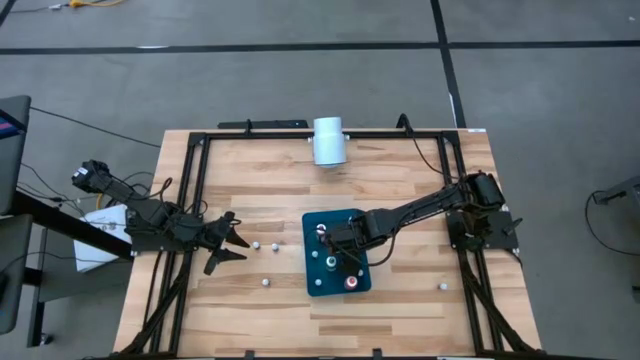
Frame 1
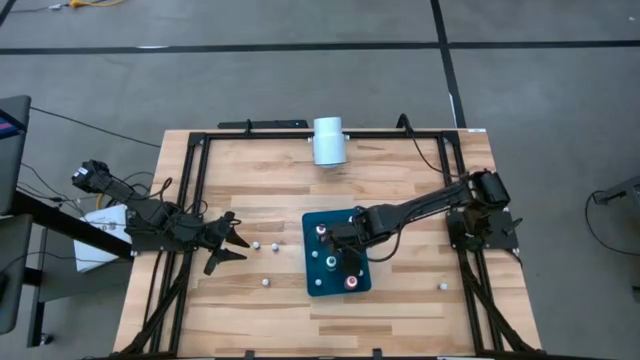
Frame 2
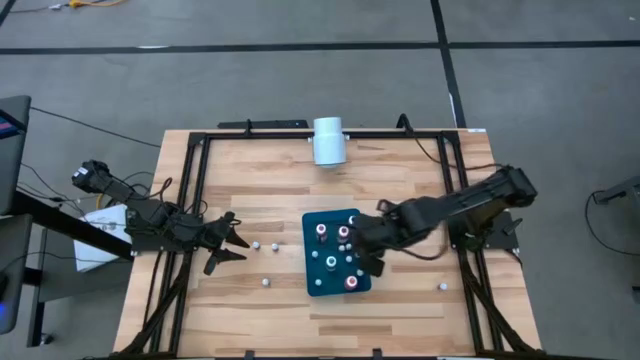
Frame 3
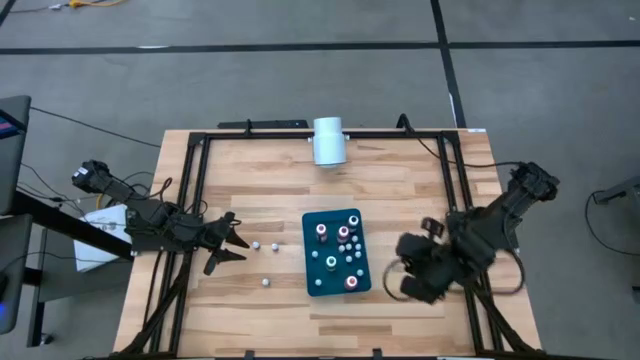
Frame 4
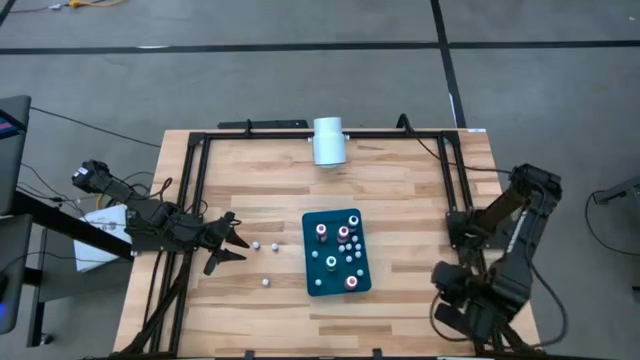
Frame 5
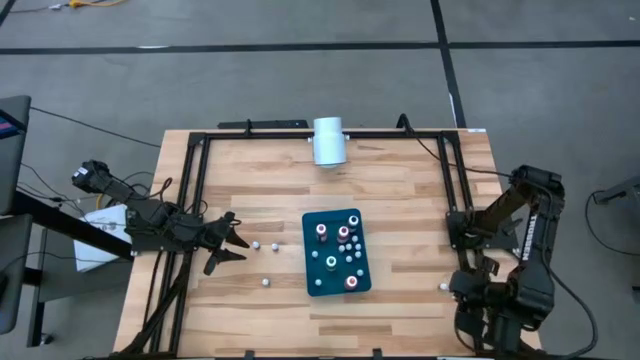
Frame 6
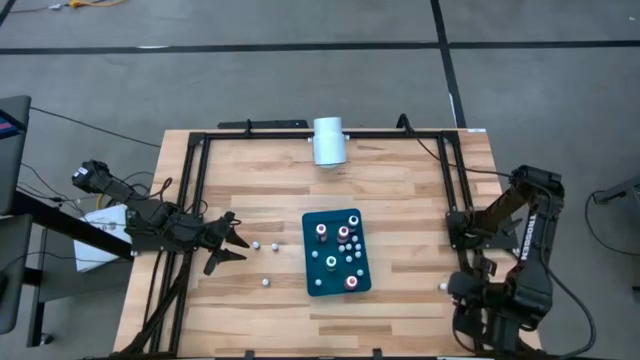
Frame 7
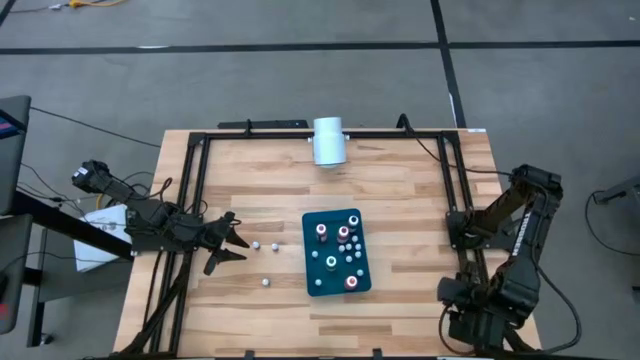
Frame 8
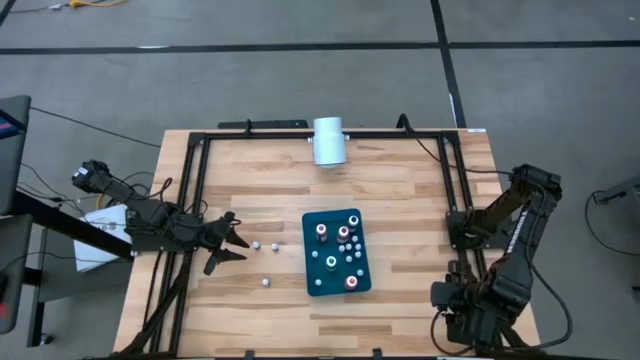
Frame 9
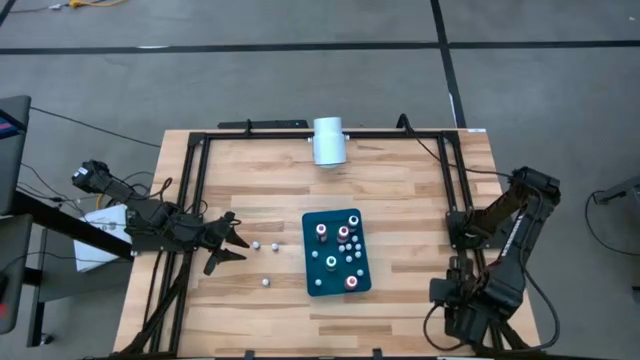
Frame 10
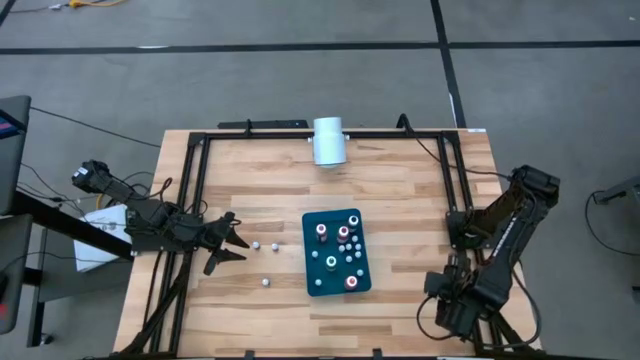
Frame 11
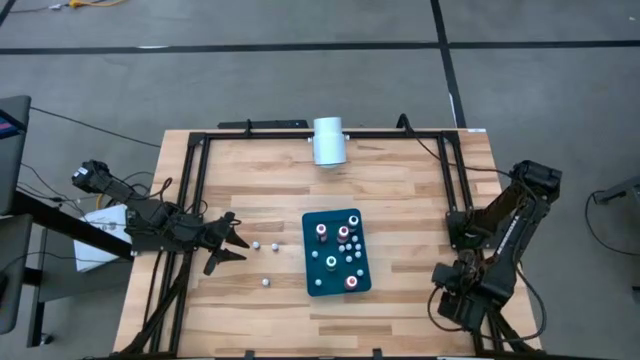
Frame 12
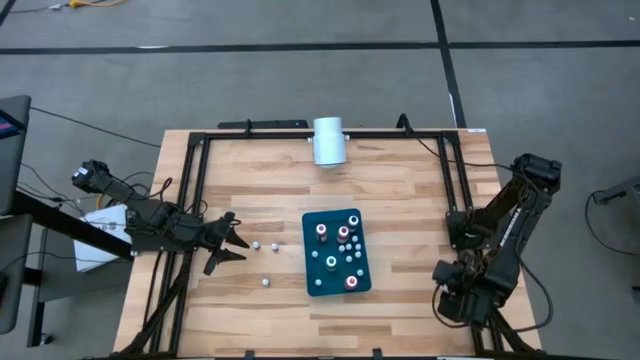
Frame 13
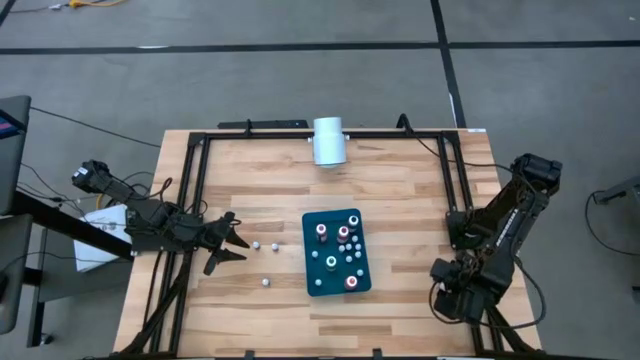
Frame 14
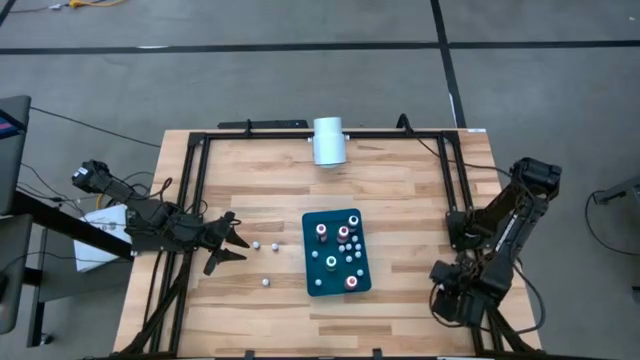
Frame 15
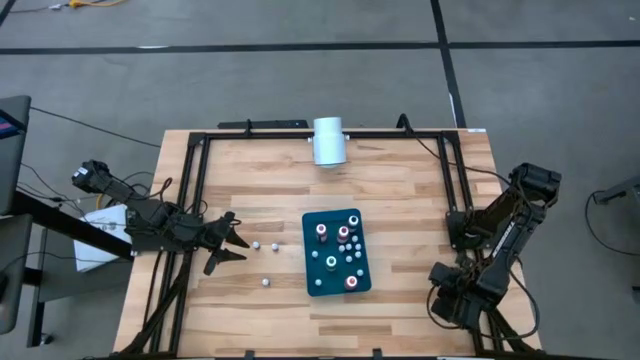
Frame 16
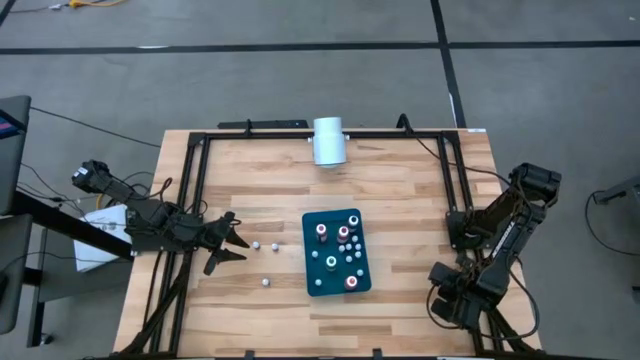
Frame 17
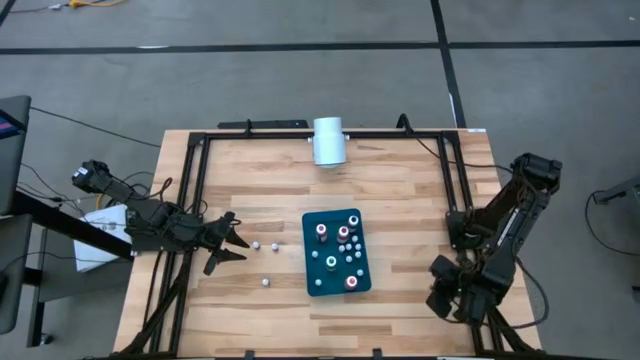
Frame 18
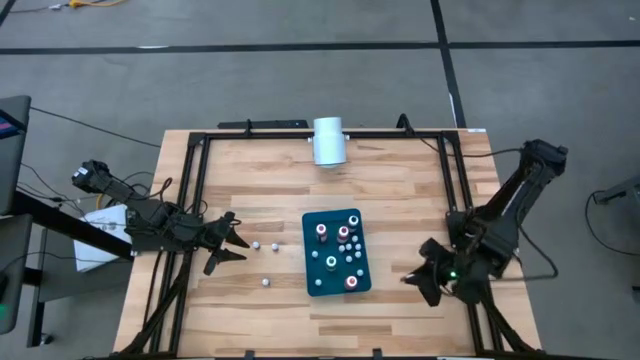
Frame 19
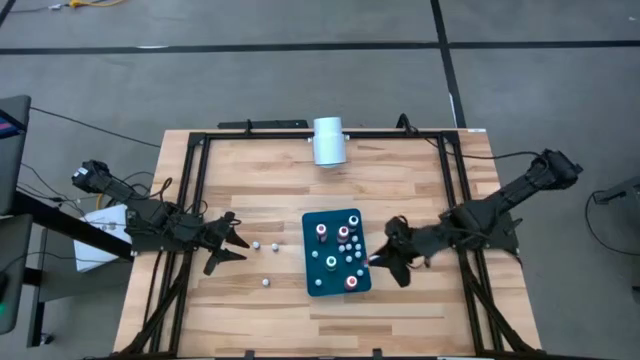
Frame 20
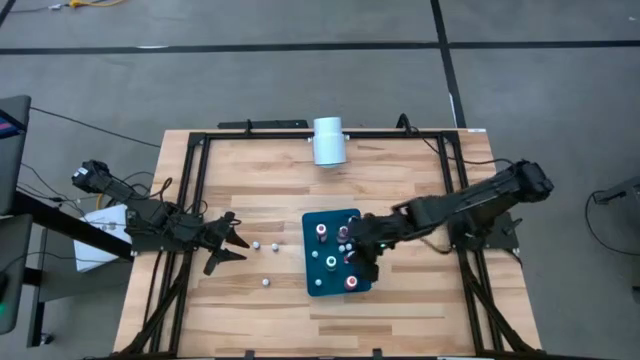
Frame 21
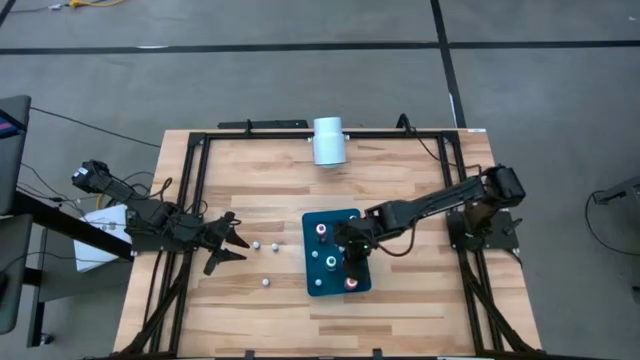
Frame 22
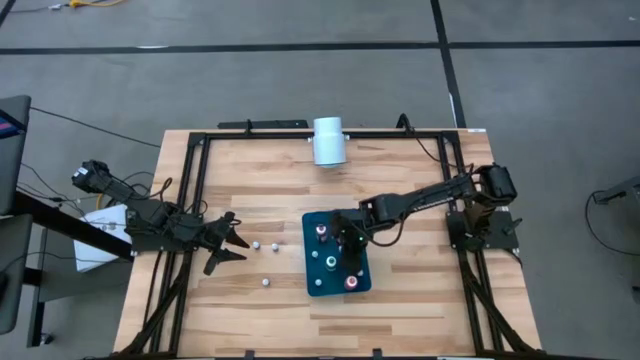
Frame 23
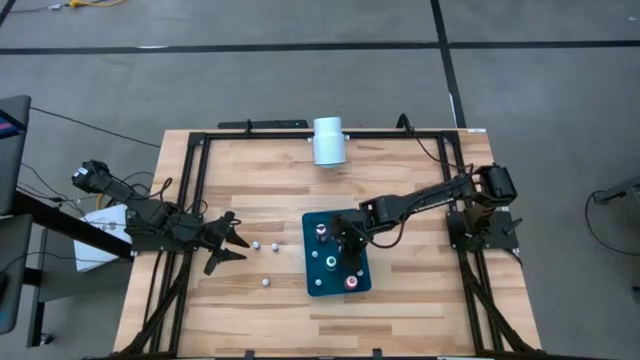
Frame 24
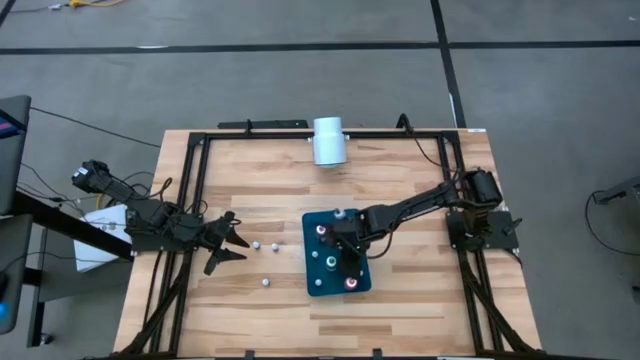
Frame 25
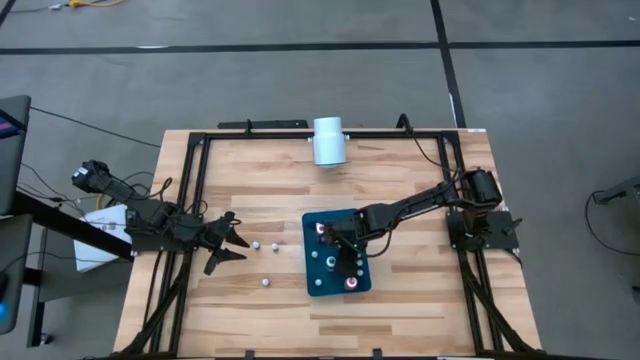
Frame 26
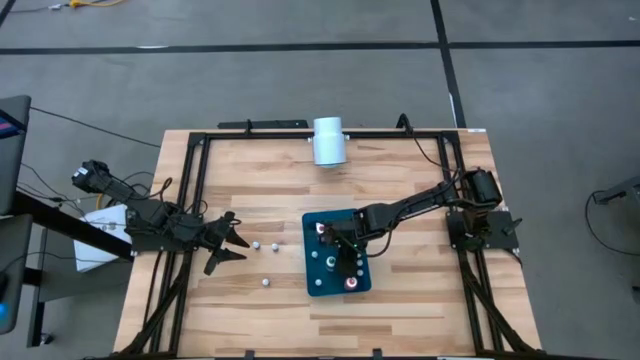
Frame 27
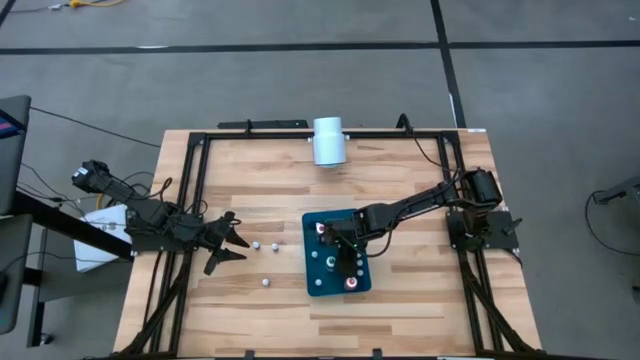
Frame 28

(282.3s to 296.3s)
Task: Pick & Place food coloring
Put the right small red food coloring bottle into the blue bin

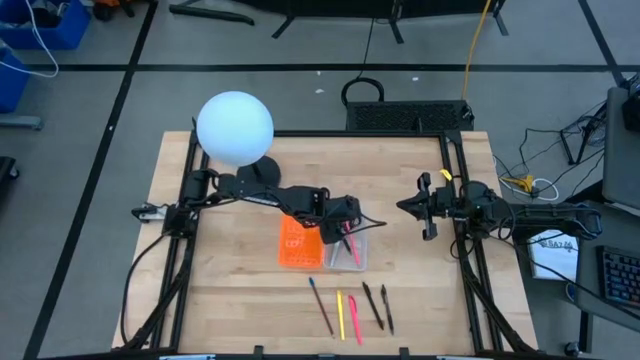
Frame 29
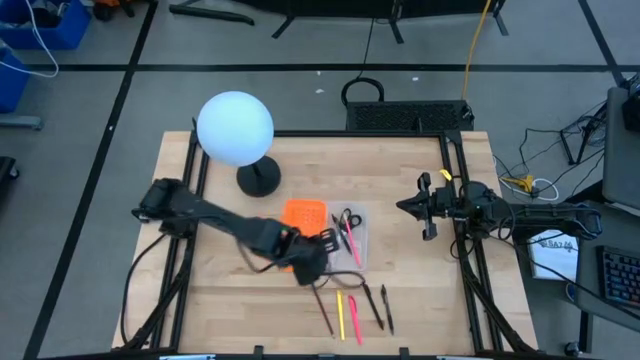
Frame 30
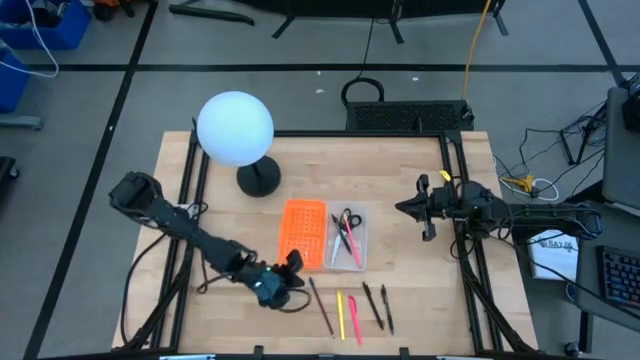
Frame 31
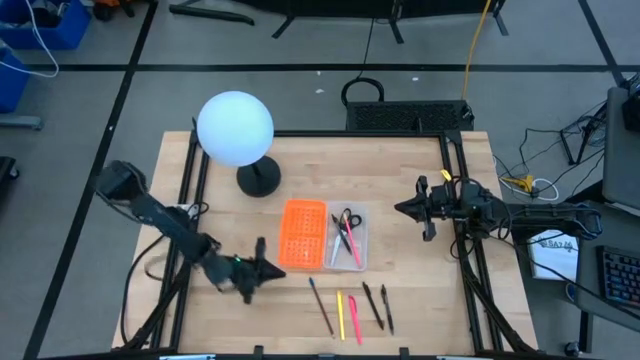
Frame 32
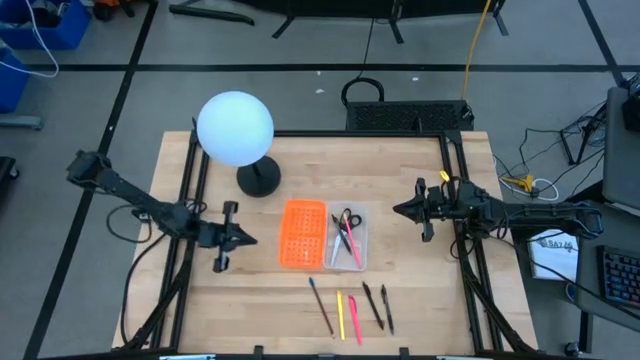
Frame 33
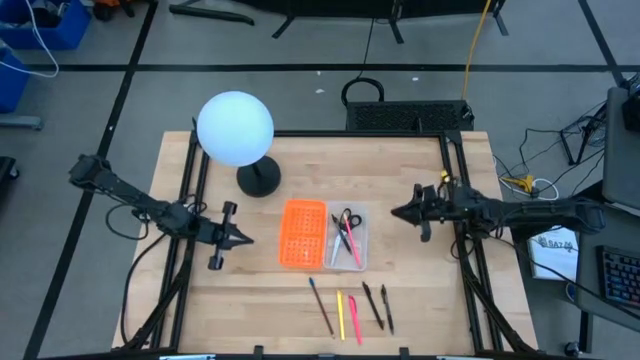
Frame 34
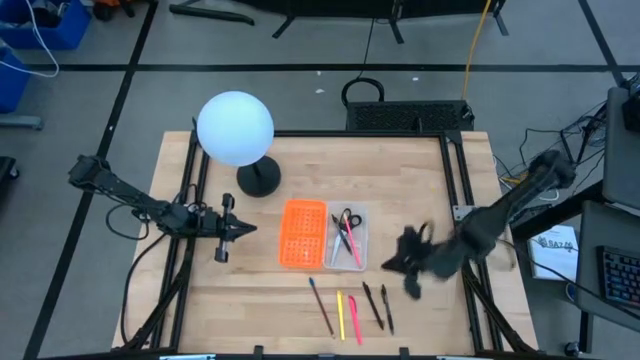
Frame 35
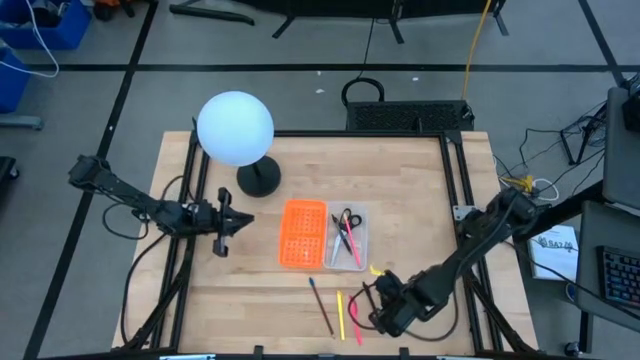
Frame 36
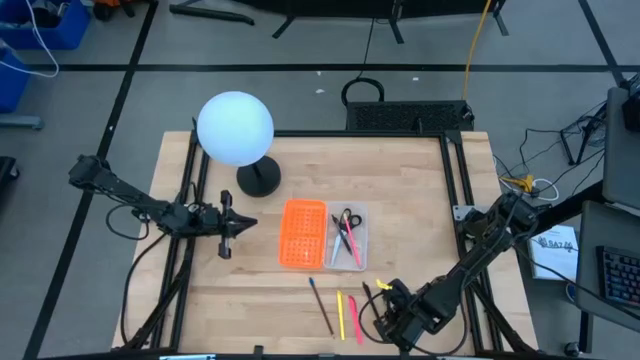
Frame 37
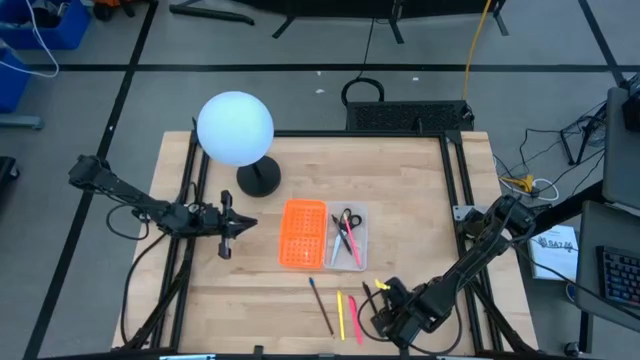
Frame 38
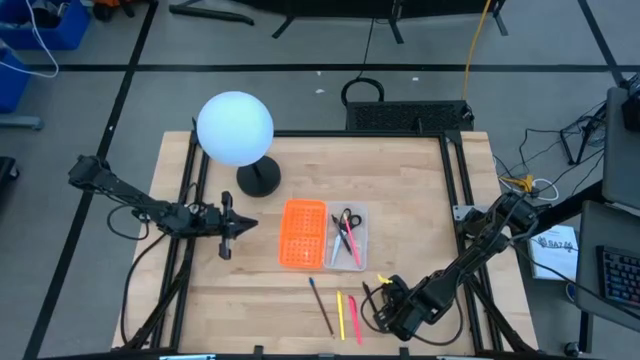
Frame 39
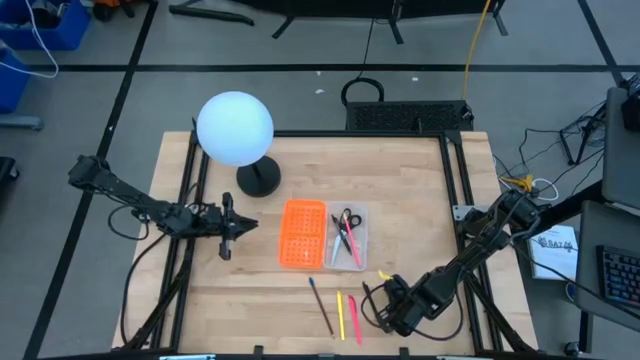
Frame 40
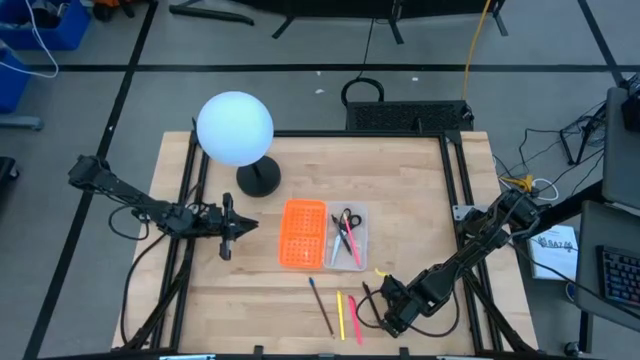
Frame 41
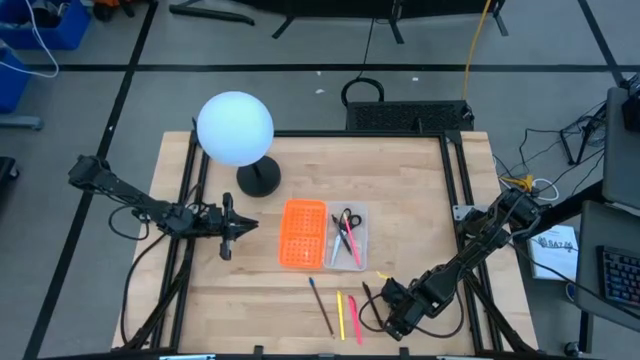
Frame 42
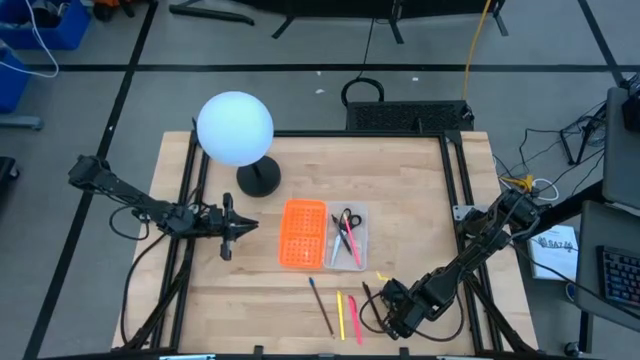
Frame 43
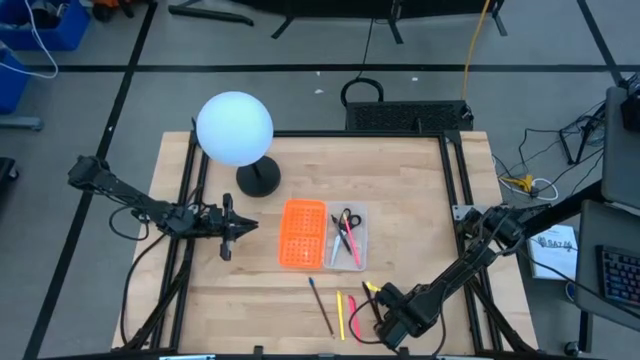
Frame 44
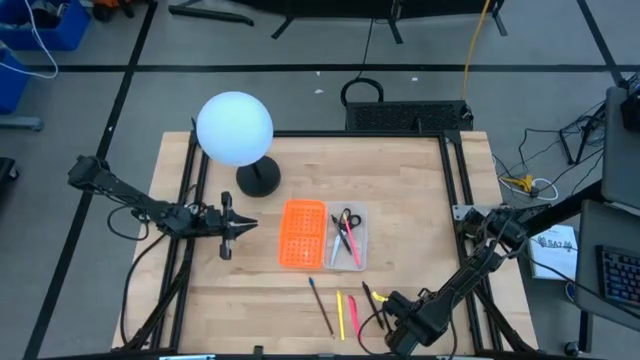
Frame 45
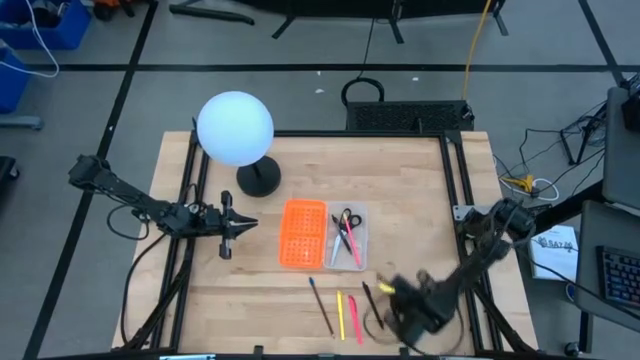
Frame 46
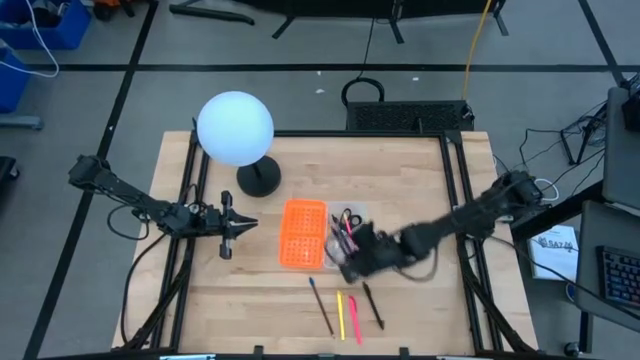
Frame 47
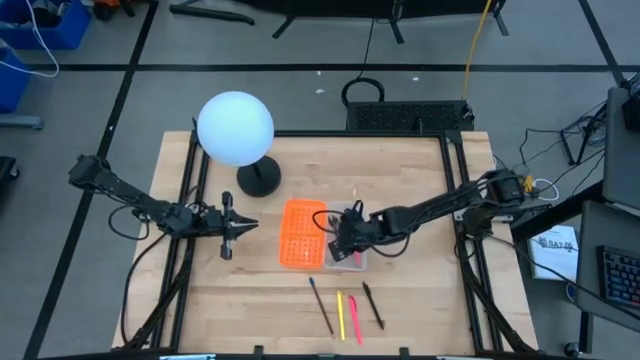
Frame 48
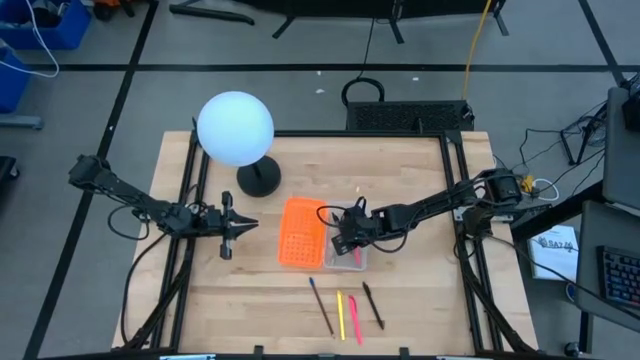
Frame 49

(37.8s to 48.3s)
Task: Pick & place school supplies into a supply box
Put the right black pen into the orange supply box
